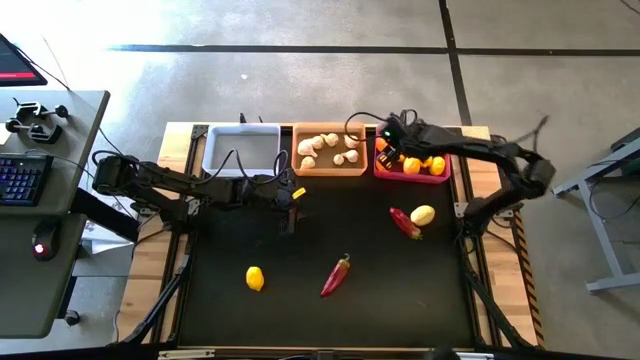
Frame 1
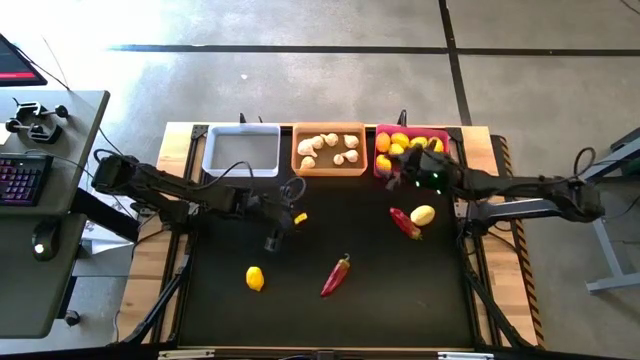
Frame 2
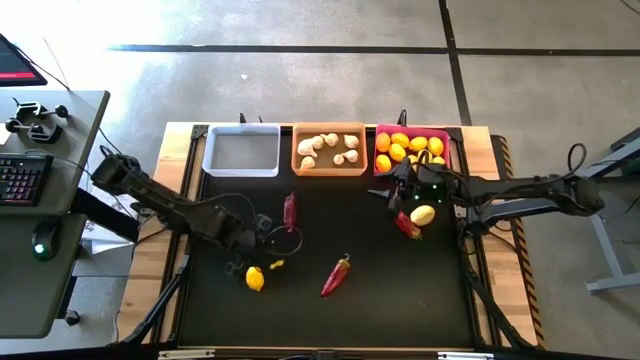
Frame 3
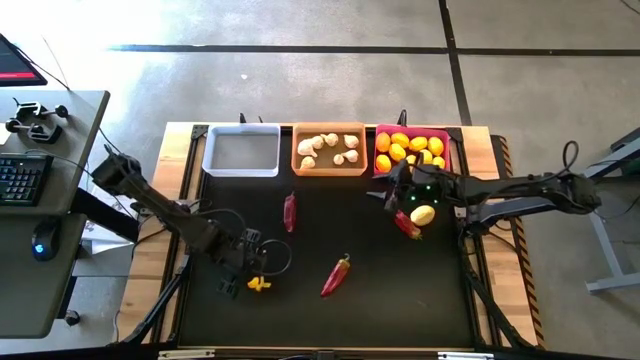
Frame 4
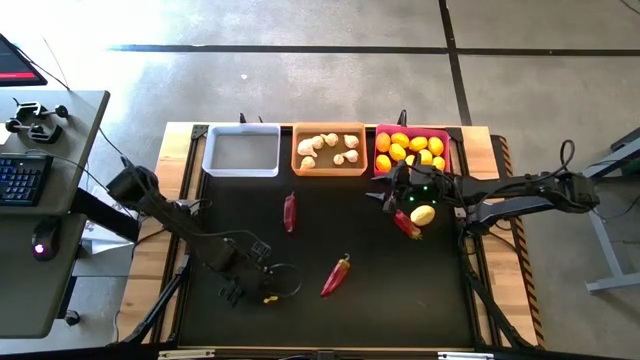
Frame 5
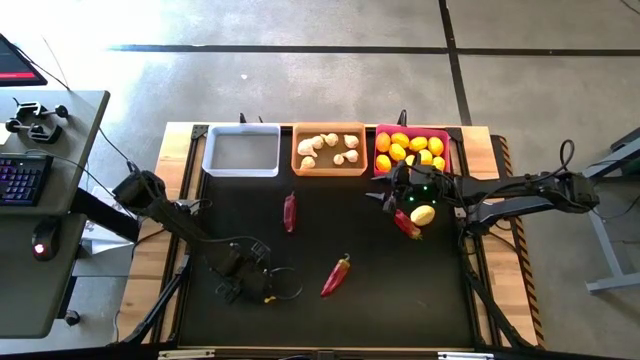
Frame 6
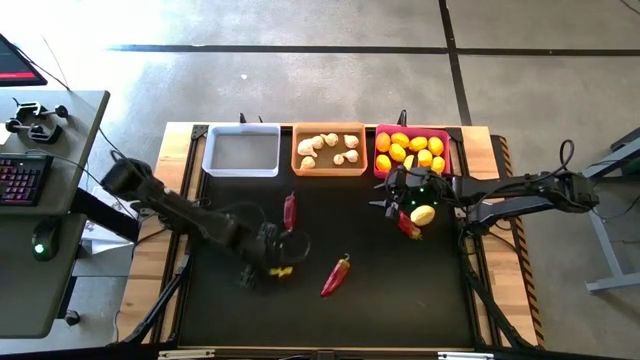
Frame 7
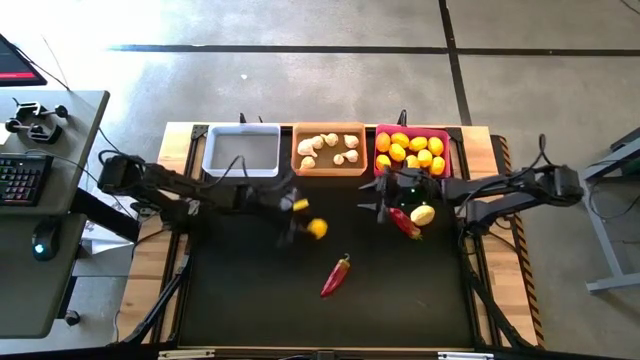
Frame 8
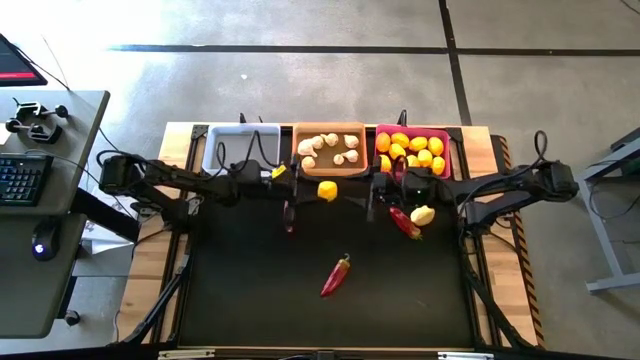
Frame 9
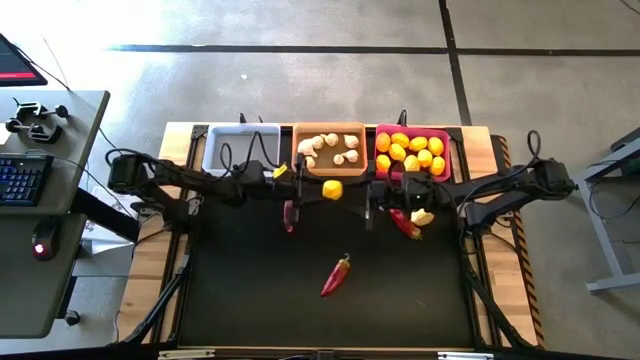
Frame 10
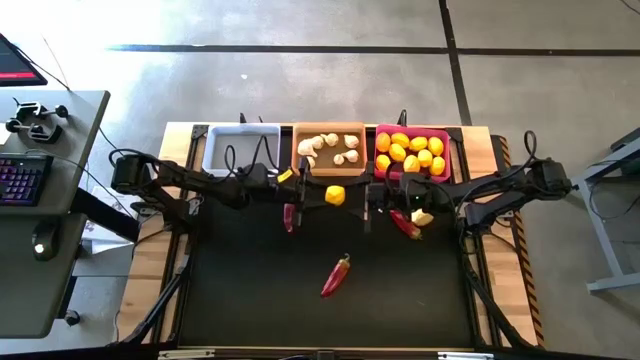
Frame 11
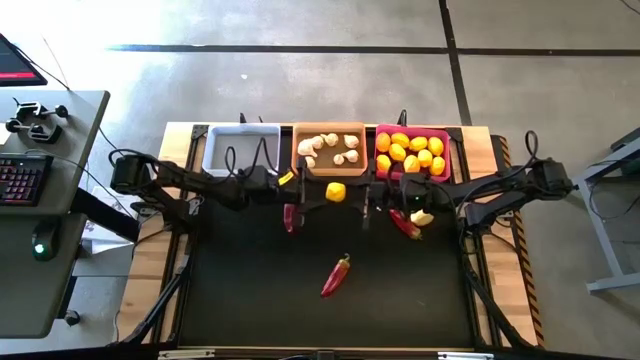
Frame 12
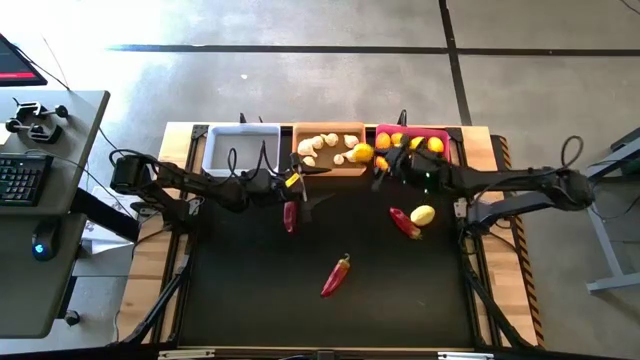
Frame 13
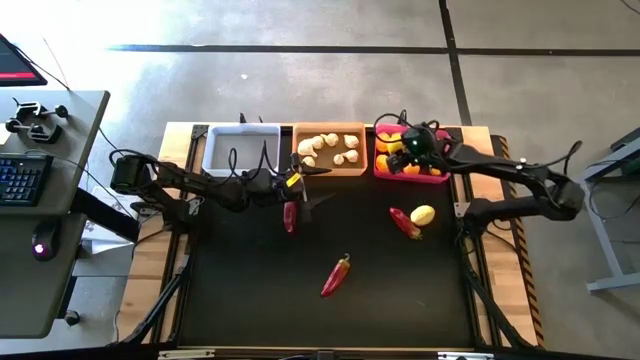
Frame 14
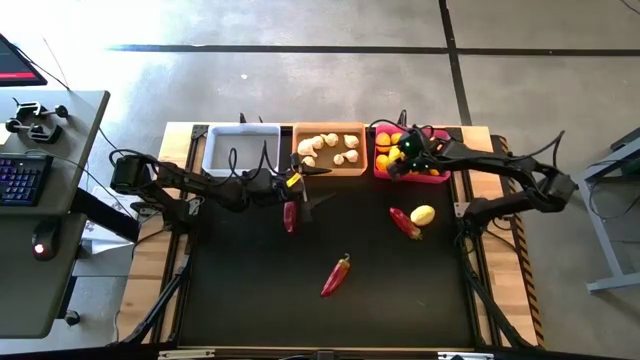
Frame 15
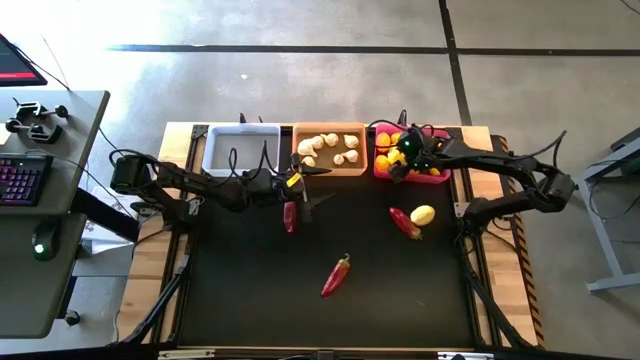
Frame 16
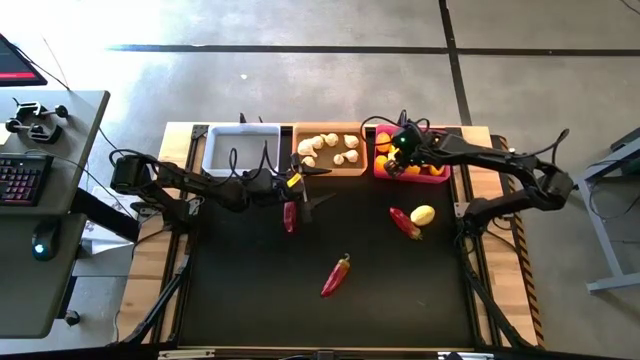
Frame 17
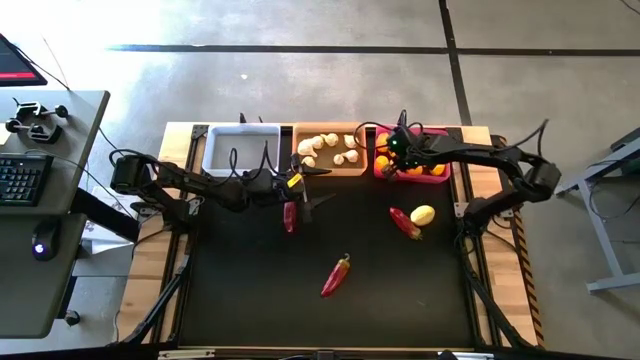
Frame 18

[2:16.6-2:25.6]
Task: Sort produce into baskets
Put the yellow lemon into the pink bin

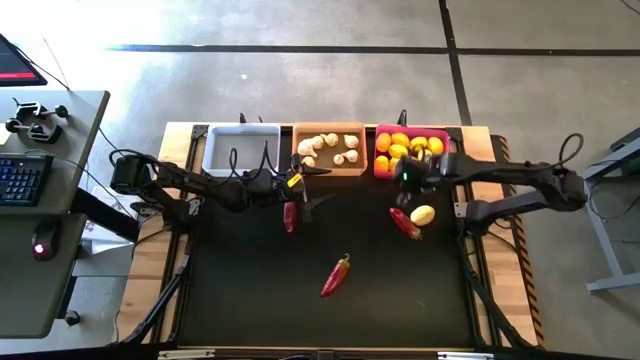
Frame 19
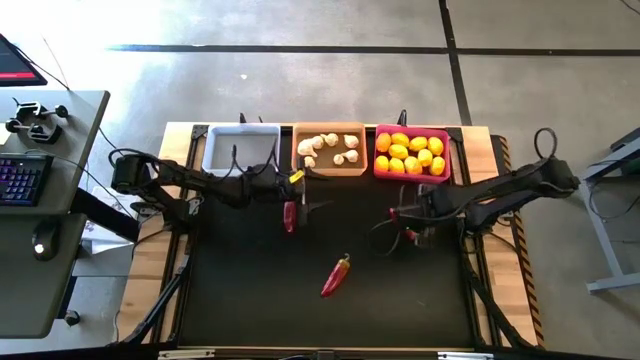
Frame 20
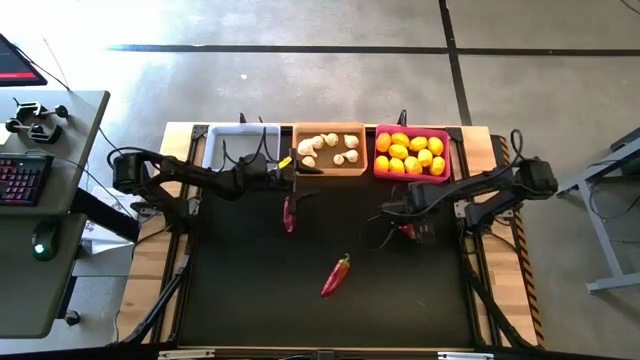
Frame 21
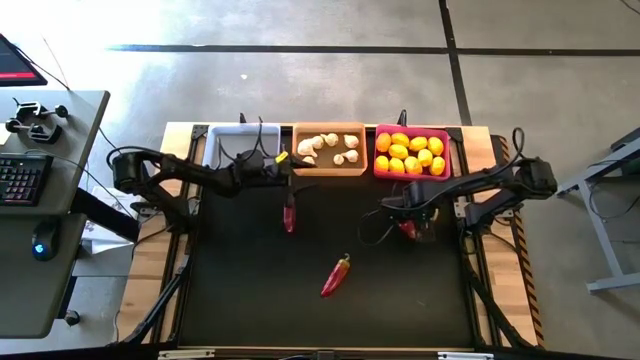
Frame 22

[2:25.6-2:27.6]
Put the yellow lemon into the pink bin

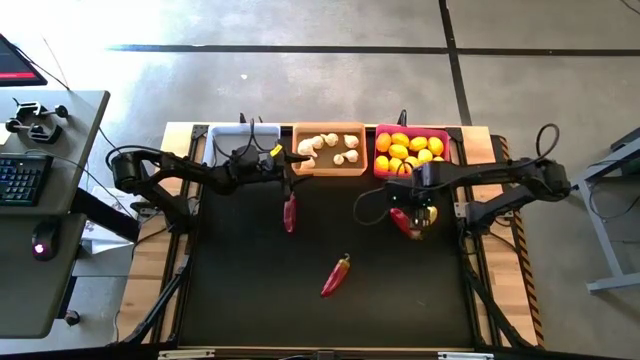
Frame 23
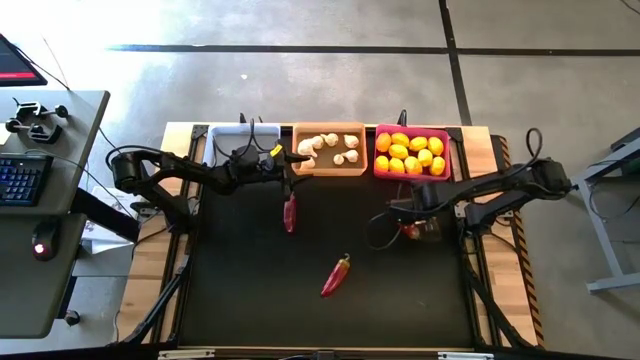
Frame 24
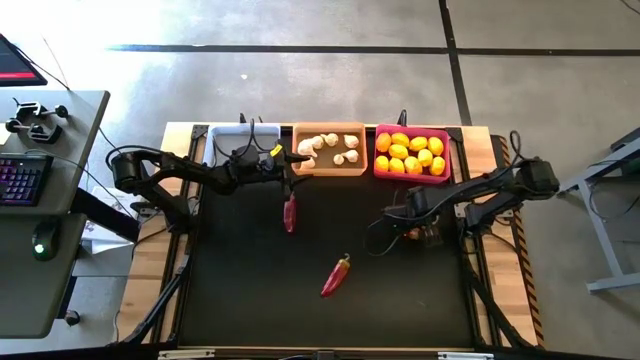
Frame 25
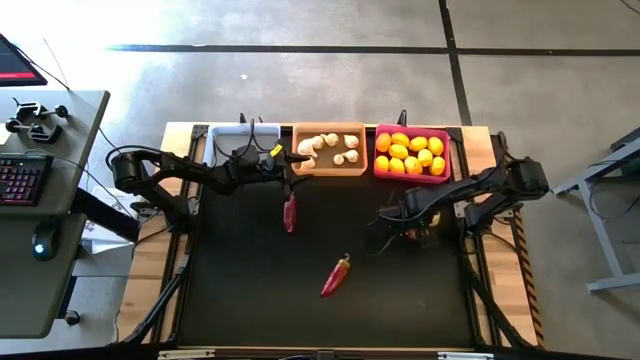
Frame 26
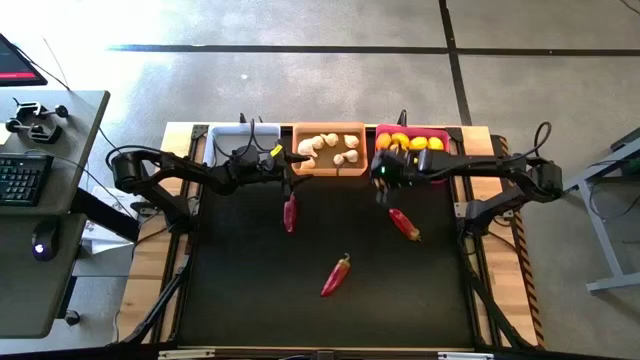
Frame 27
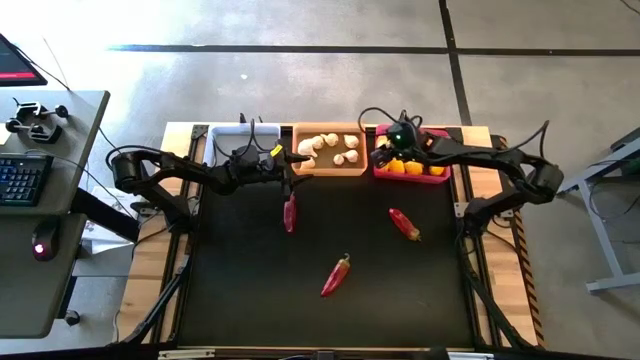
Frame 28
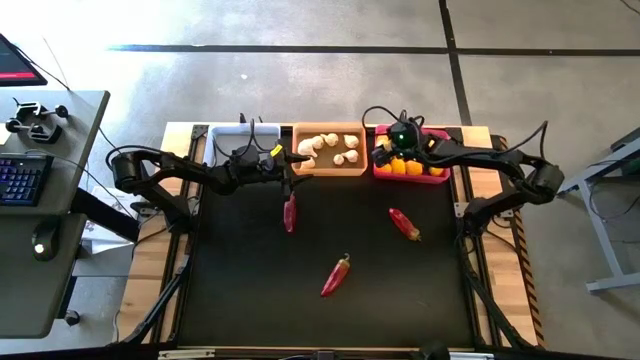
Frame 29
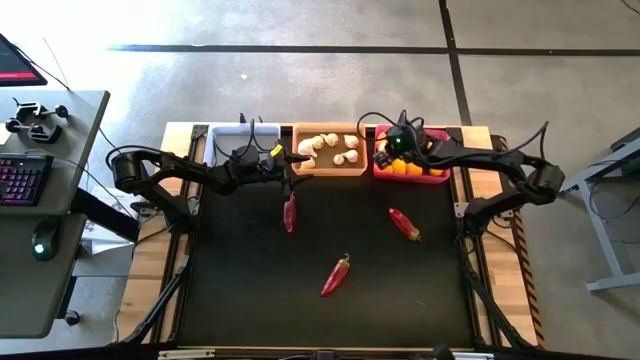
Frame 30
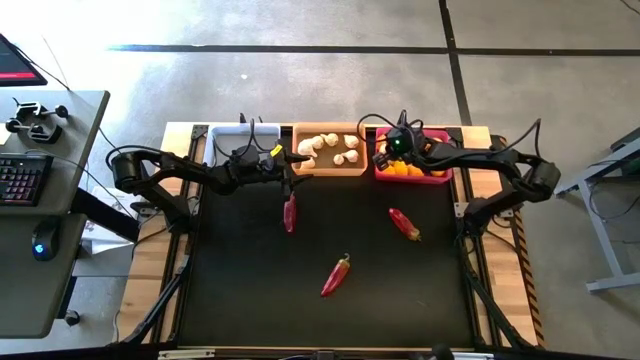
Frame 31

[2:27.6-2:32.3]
Put the yellow lemon into the pink bin

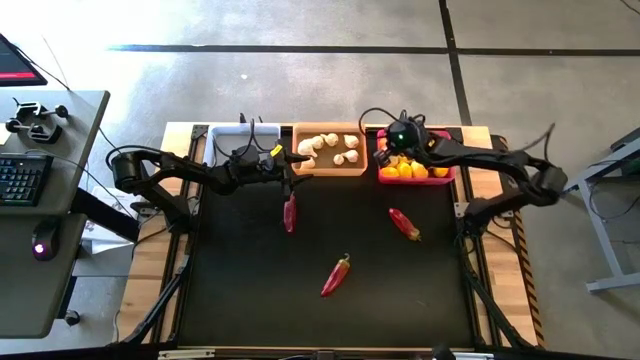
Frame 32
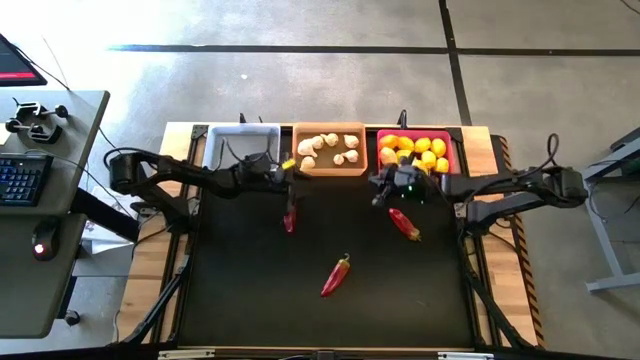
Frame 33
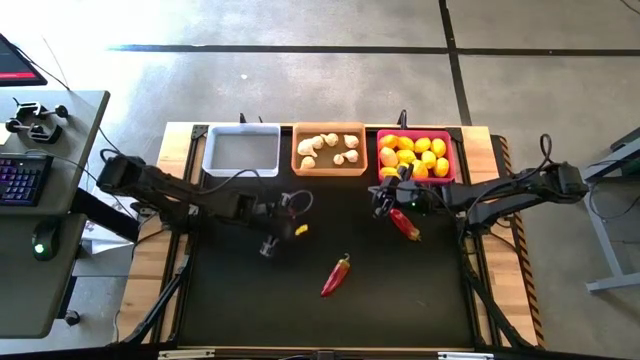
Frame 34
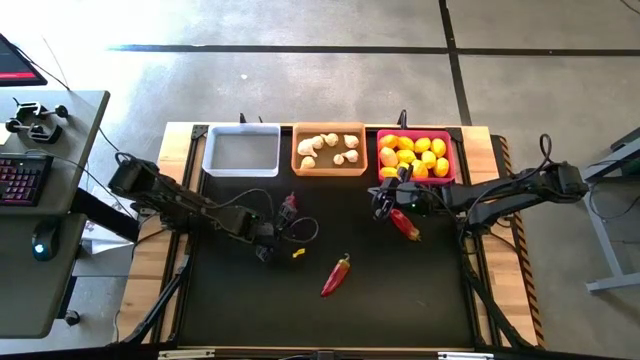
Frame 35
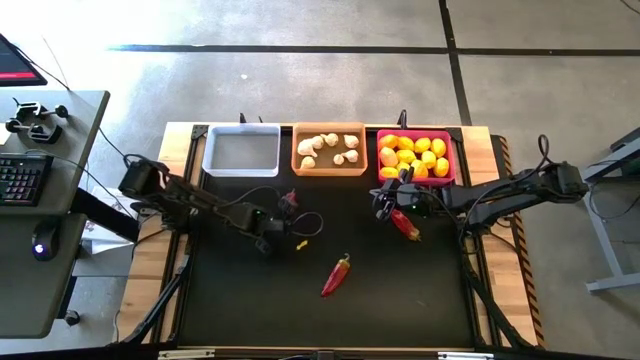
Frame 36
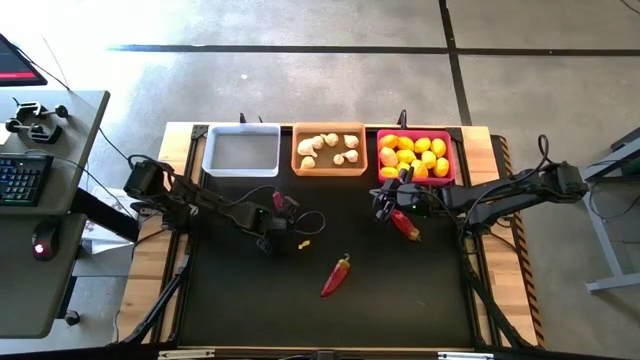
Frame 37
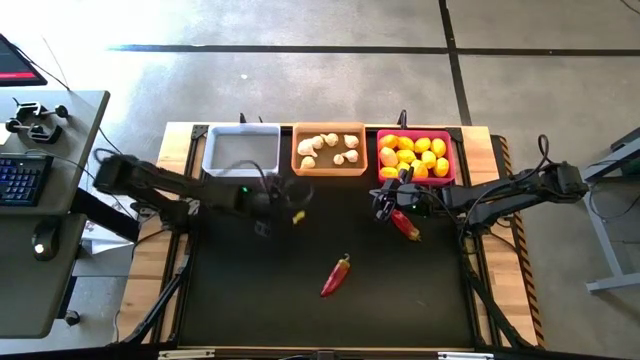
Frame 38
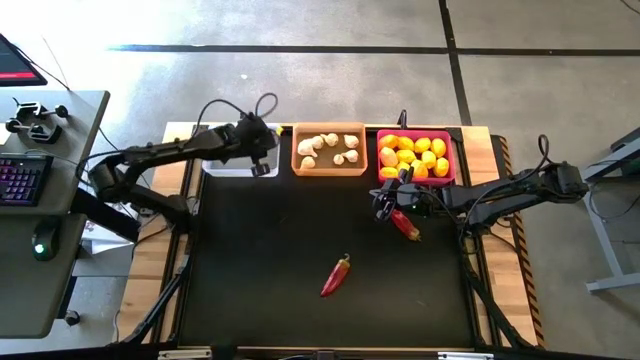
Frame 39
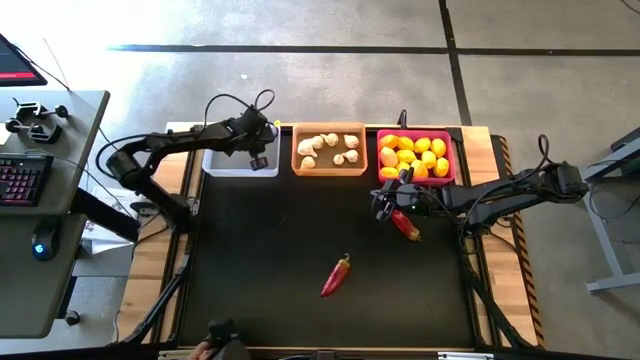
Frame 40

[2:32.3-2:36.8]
Put the red chili pepper into the transparent bin
